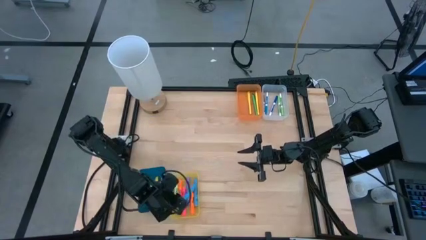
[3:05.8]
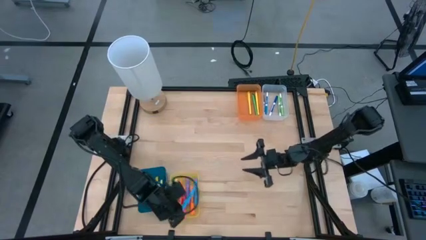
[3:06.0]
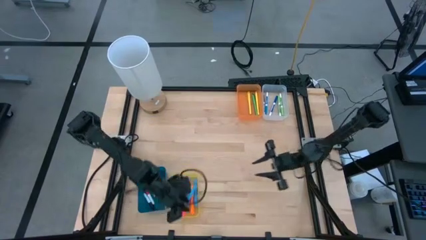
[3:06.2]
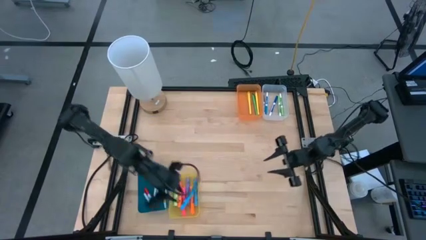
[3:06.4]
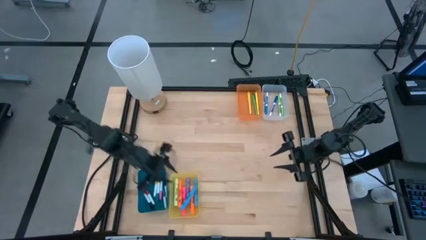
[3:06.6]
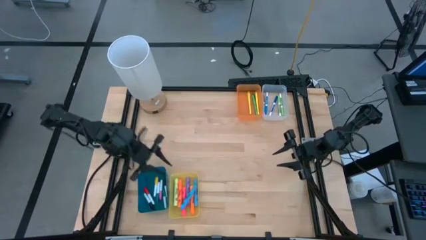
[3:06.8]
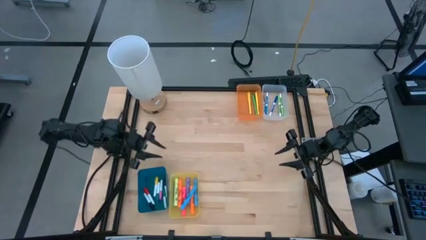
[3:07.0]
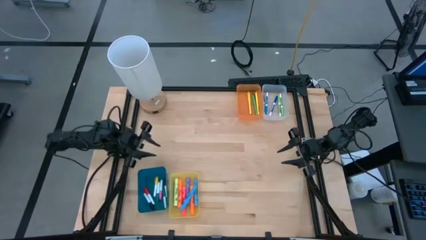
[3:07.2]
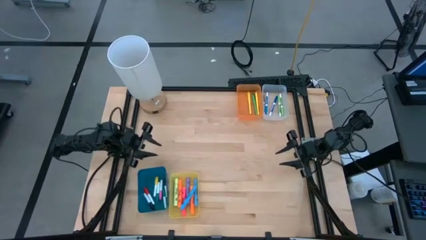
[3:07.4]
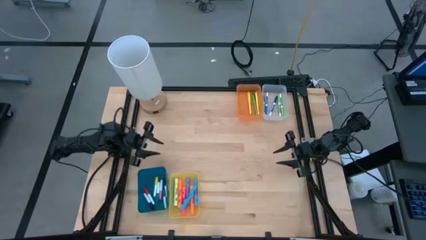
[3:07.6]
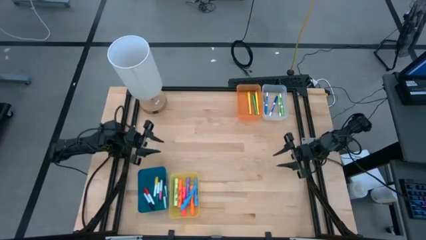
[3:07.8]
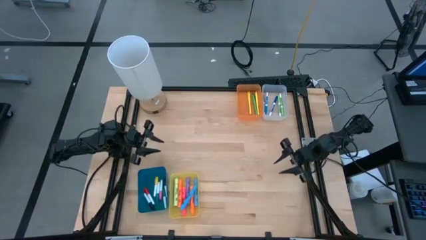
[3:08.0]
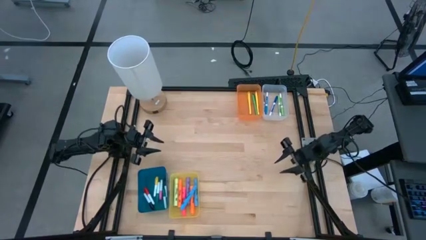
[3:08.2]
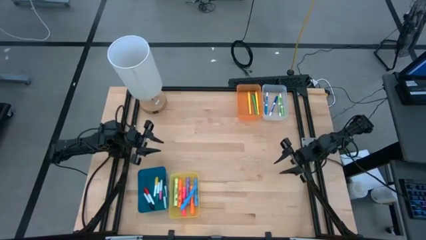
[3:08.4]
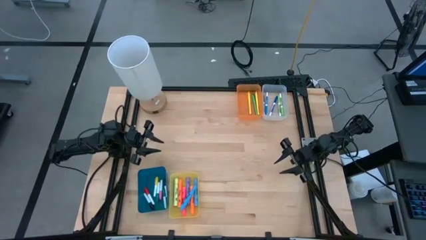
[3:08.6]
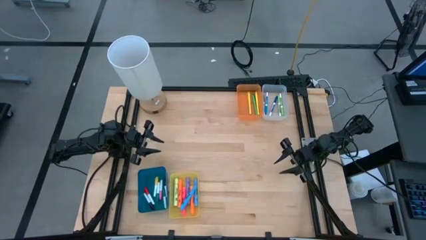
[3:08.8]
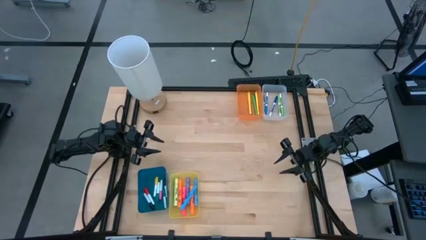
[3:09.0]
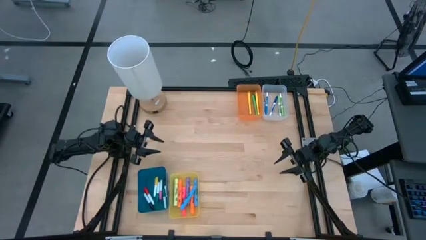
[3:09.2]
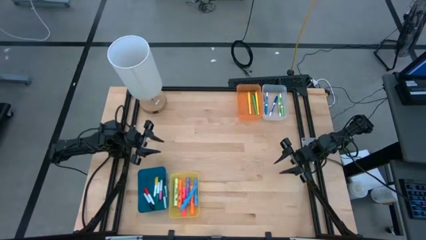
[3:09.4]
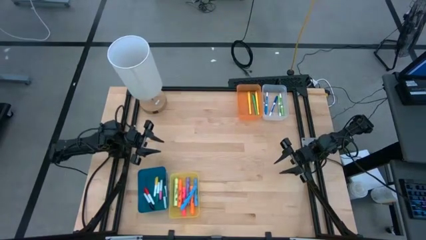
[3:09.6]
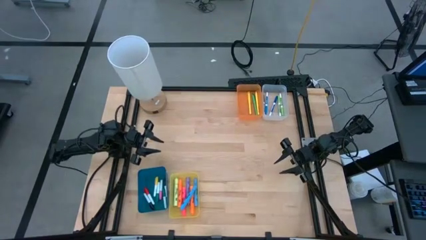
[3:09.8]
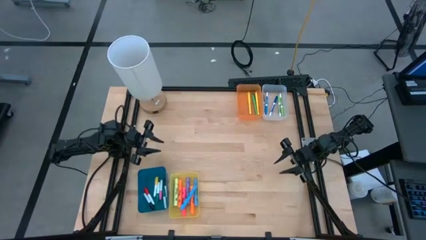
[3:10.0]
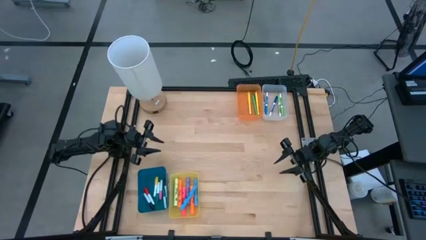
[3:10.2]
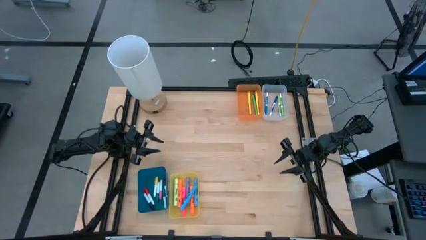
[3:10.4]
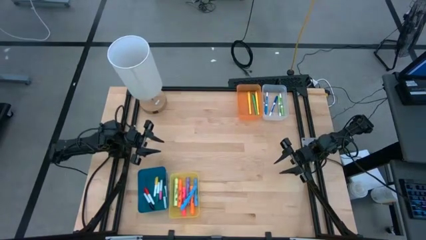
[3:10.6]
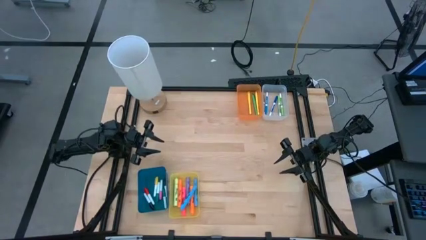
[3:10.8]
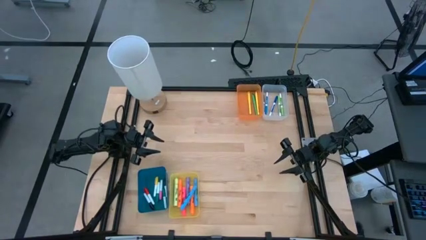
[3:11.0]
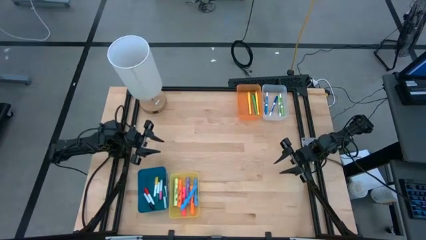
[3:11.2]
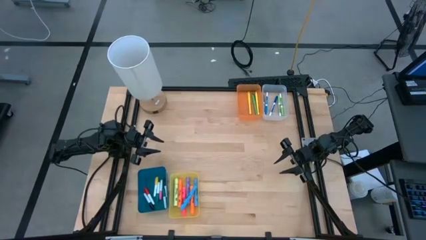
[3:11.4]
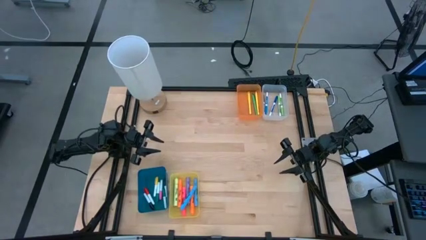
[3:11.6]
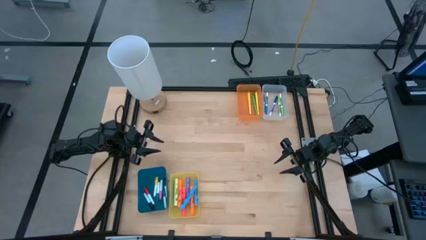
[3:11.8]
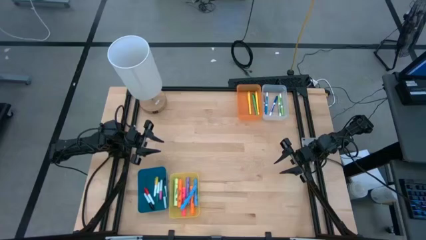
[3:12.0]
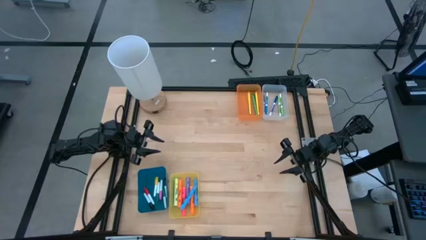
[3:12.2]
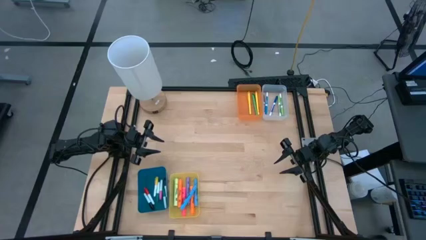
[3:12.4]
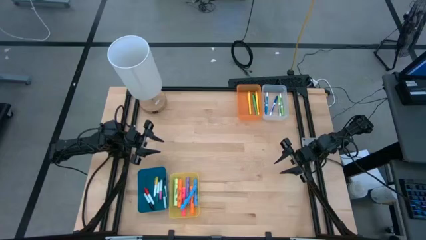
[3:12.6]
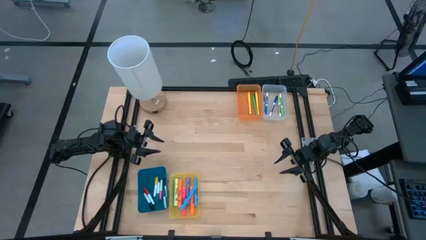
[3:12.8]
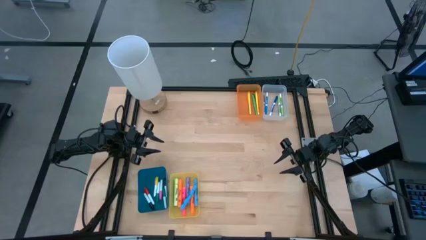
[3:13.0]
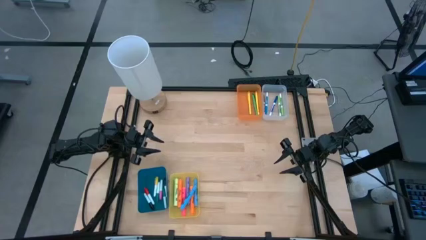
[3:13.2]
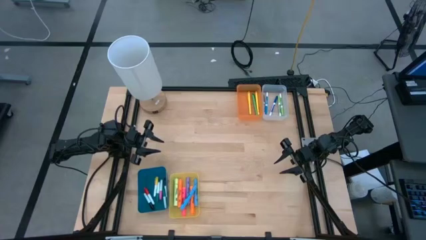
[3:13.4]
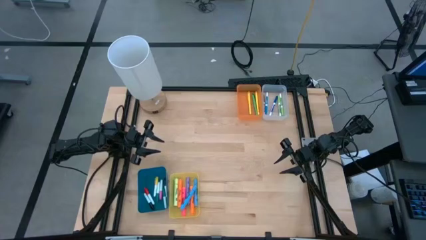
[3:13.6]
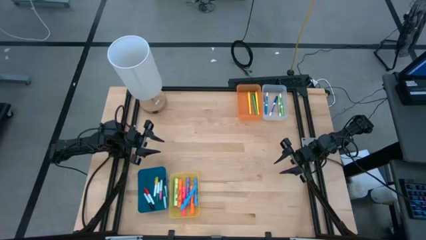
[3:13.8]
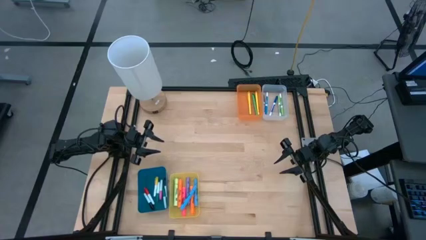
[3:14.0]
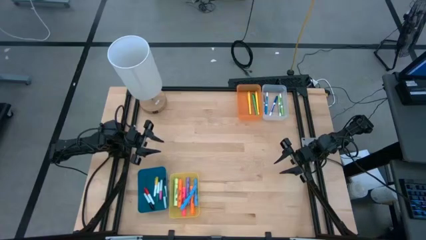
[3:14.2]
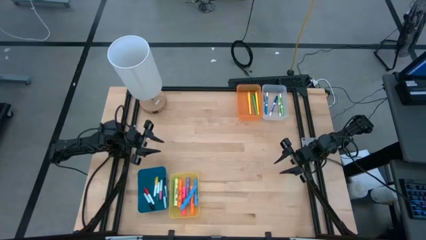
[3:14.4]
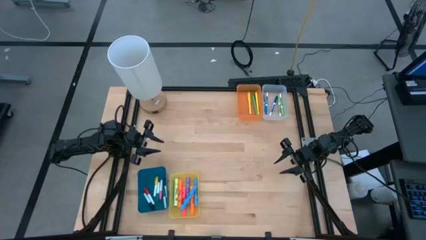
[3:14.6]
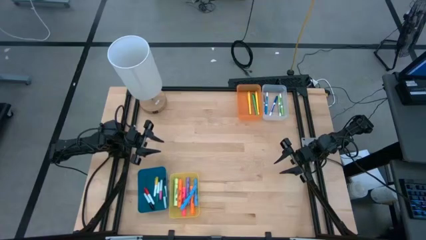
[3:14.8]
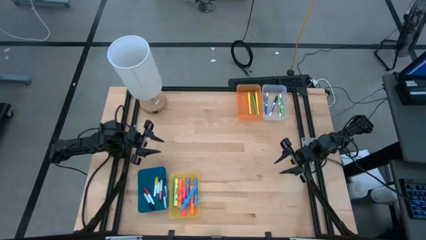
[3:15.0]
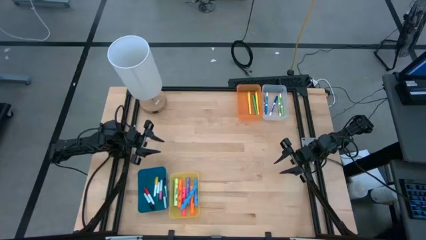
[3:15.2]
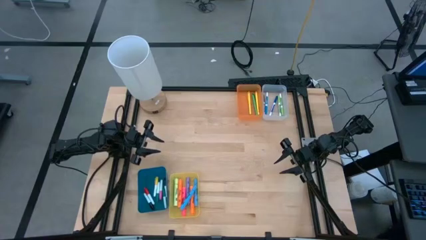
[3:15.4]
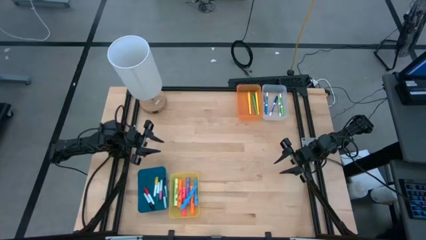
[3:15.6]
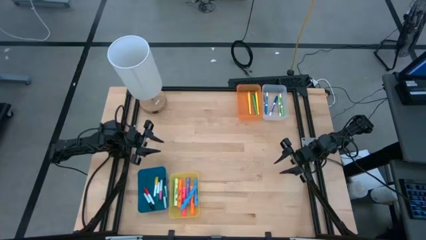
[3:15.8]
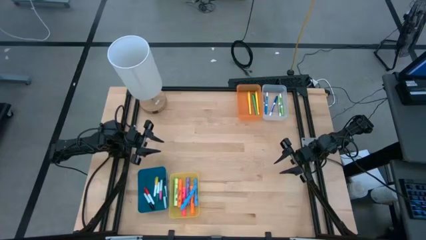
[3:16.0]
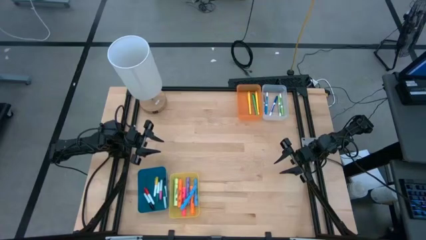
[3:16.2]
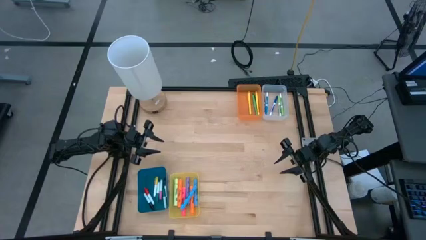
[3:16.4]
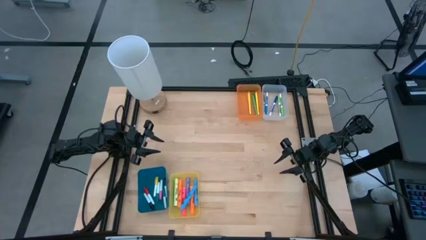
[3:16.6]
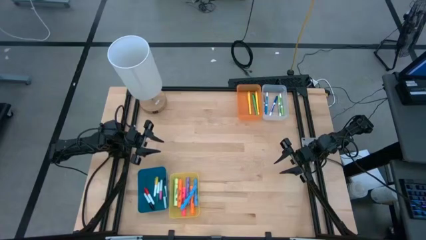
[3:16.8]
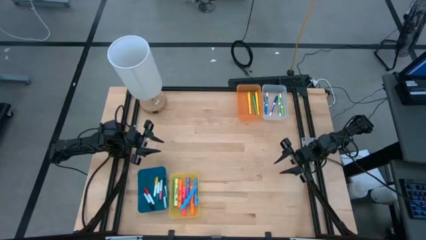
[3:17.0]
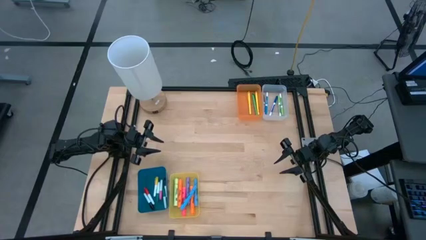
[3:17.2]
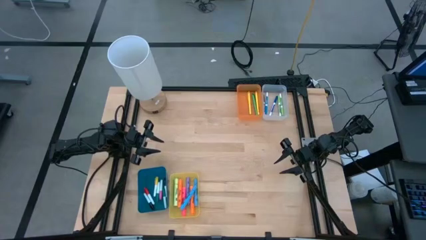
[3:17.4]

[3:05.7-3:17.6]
Task: Pick & Place Markers
Return to Home Position

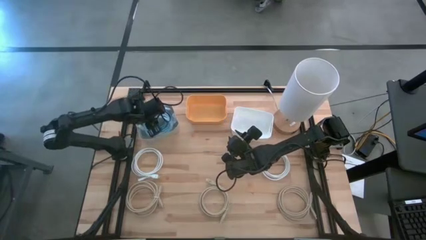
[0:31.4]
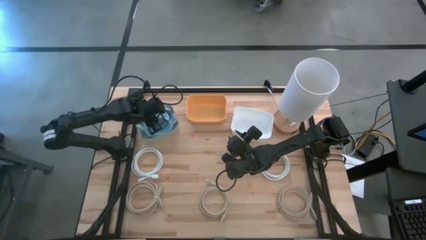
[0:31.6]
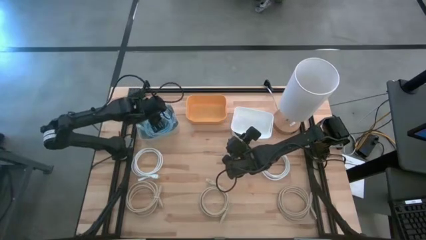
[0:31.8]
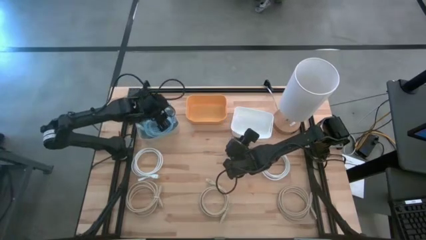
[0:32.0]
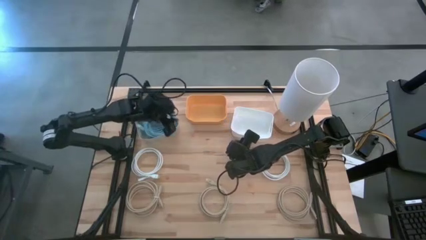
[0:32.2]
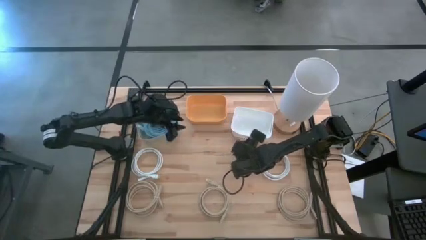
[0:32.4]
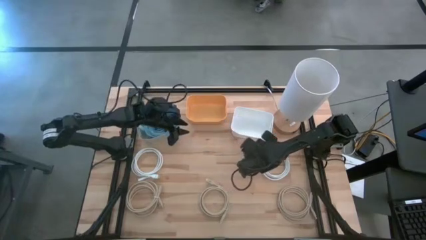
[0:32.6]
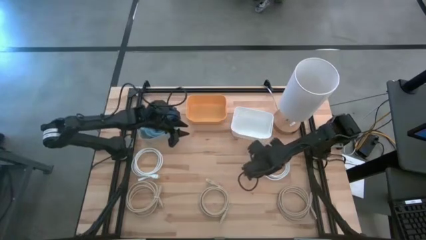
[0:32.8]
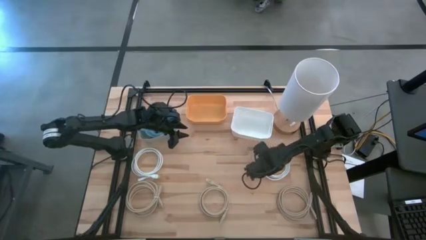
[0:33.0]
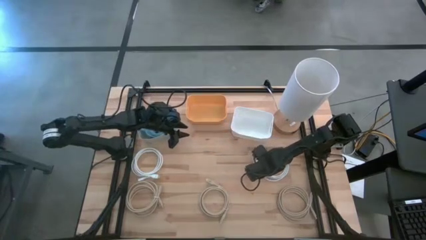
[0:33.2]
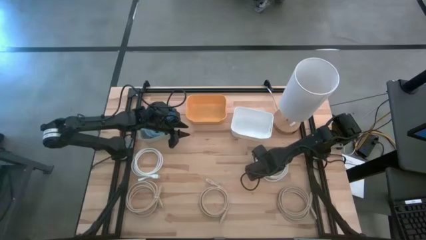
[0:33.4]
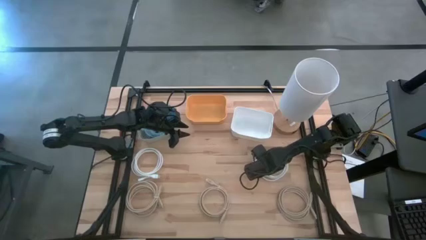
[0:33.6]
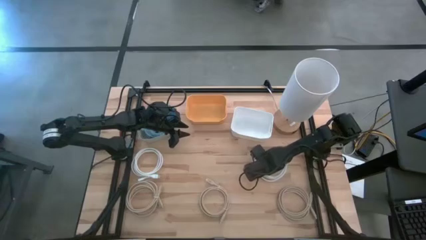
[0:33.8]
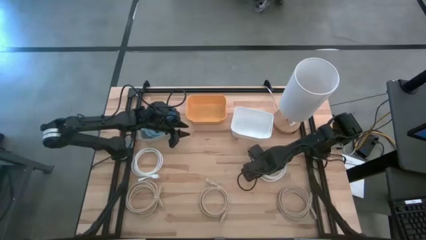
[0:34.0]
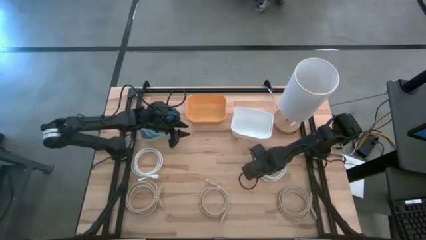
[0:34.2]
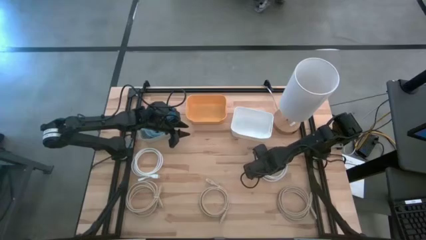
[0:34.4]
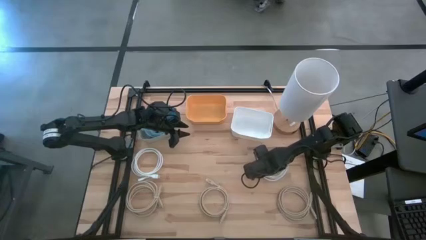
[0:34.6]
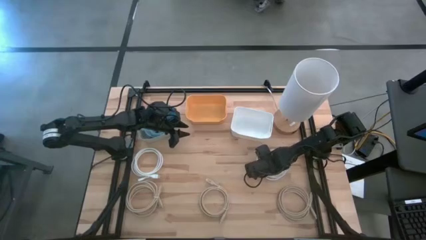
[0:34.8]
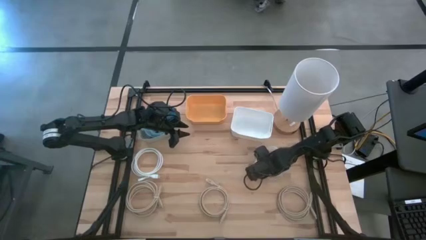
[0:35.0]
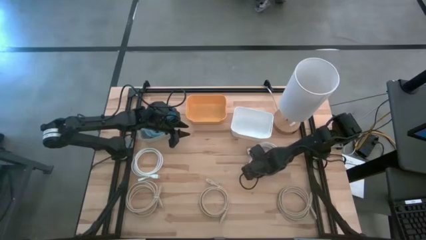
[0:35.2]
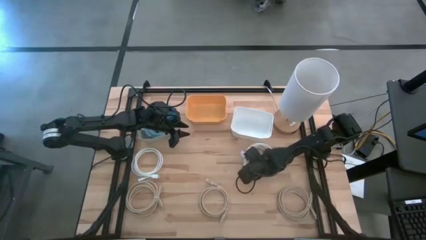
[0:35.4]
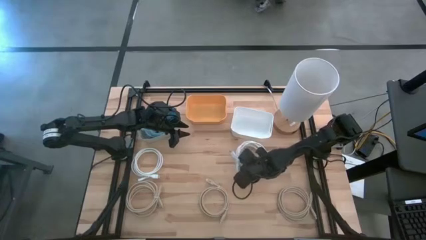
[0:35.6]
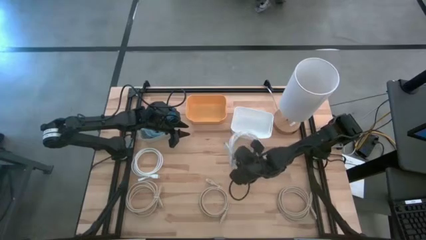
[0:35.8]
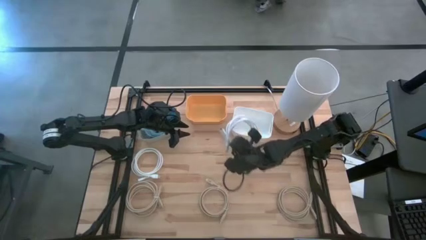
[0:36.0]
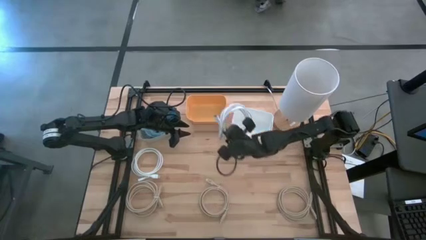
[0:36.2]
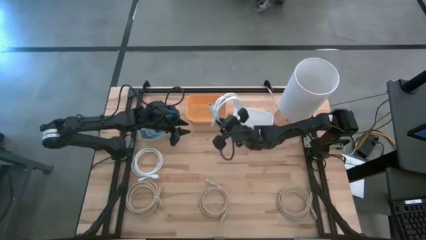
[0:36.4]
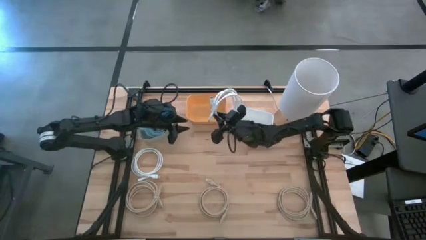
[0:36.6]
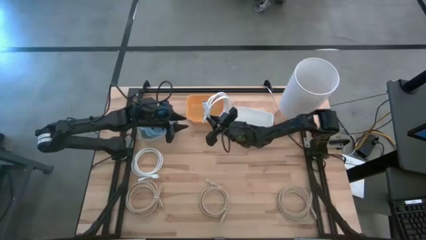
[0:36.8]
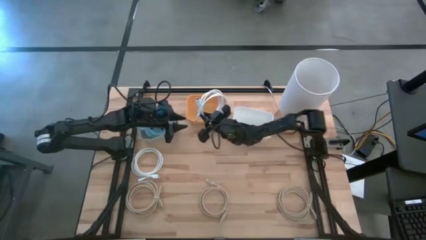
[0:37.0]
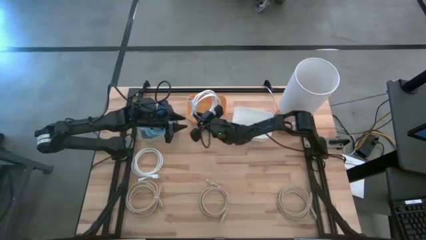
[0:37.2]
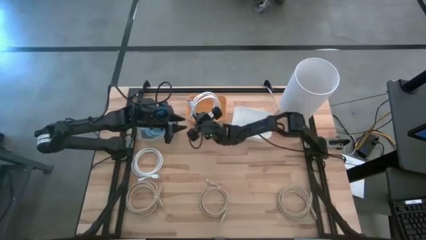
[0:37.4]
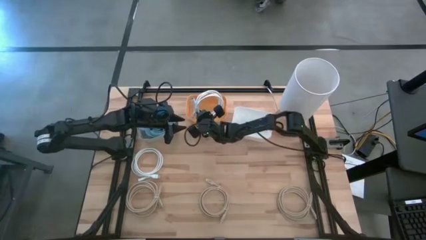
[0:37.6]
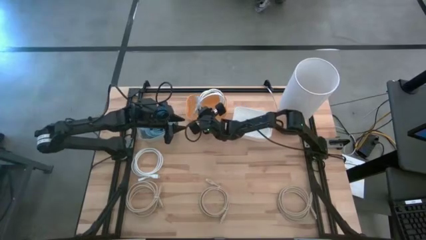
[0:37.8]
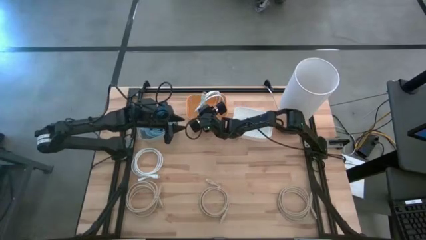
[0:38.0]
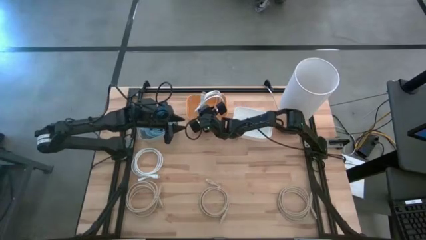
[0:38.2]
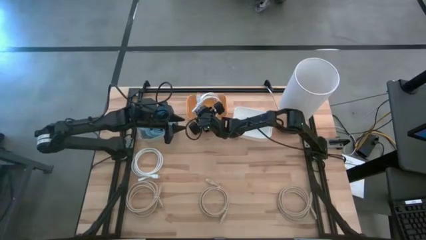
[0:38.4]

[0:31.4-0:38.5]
Task: Sort HDMI cables
Put the right white hdmi cable into the orange bin
